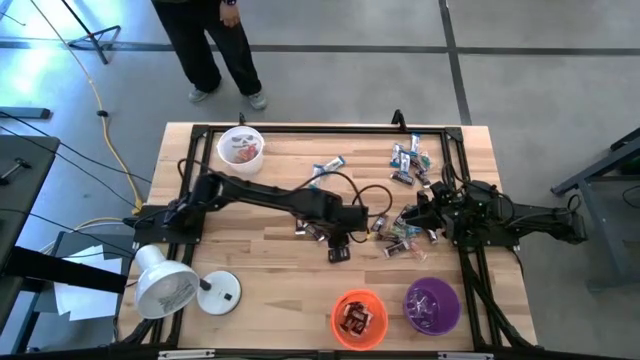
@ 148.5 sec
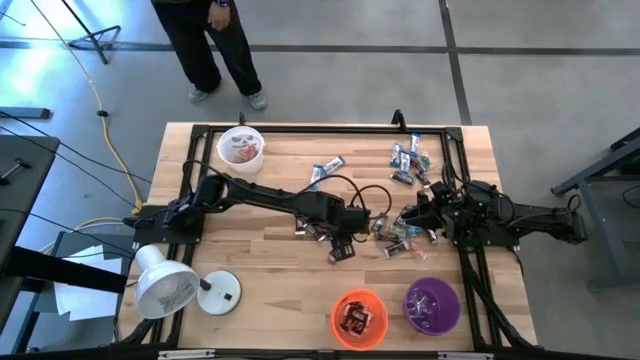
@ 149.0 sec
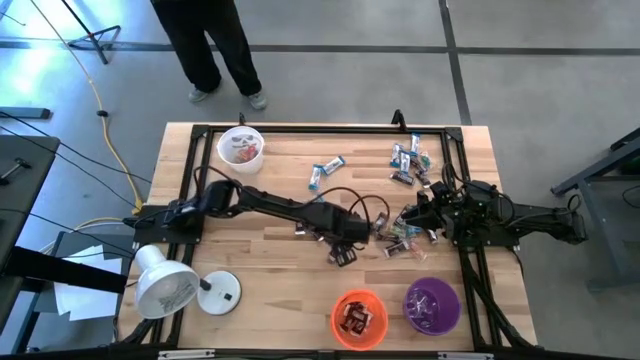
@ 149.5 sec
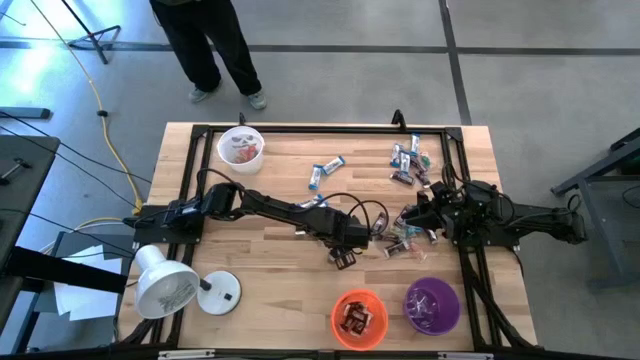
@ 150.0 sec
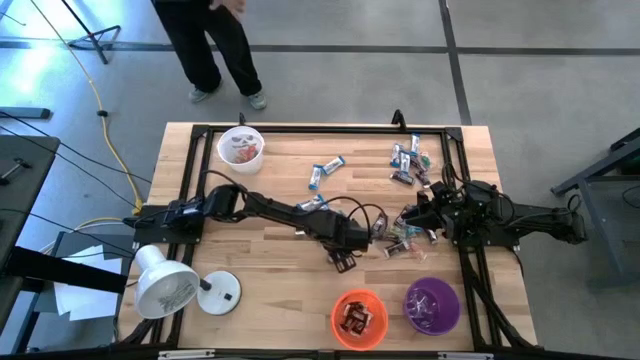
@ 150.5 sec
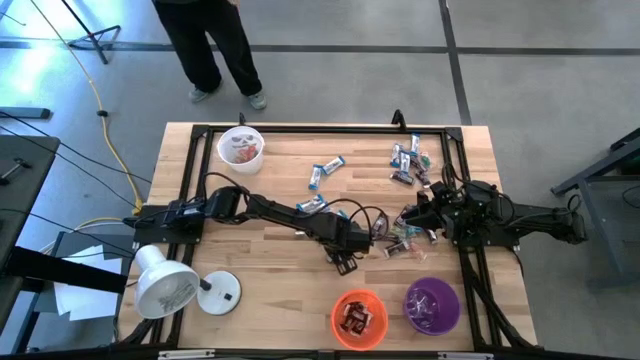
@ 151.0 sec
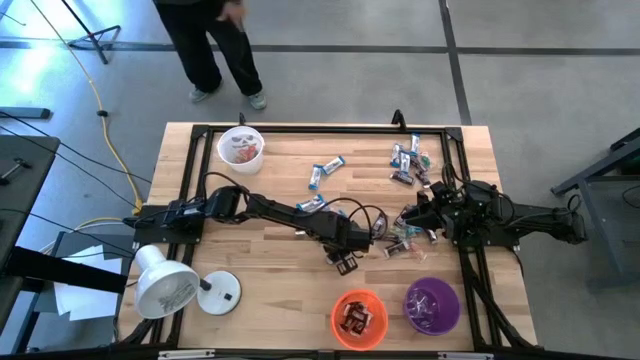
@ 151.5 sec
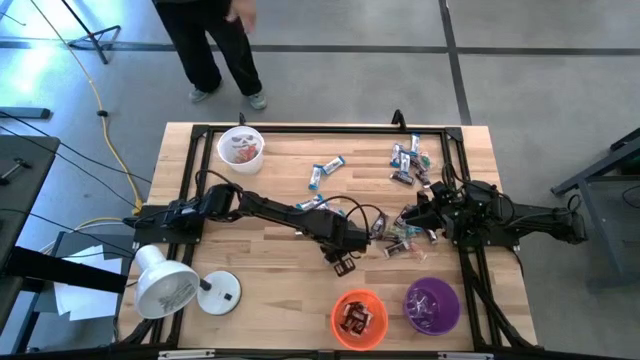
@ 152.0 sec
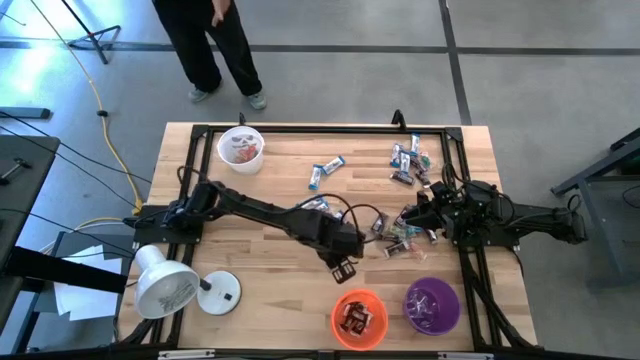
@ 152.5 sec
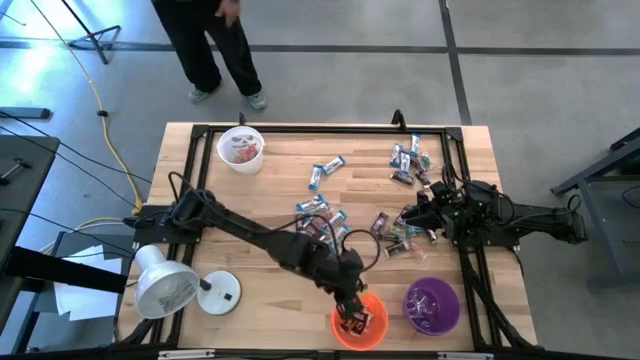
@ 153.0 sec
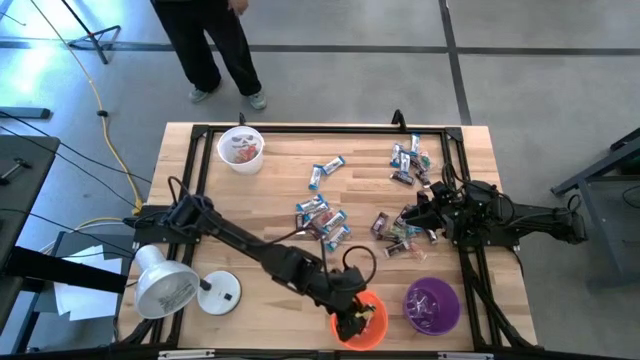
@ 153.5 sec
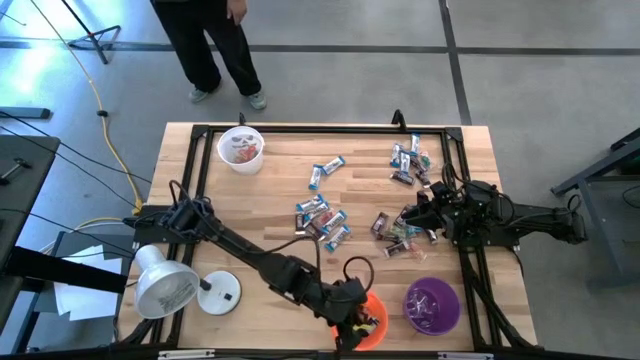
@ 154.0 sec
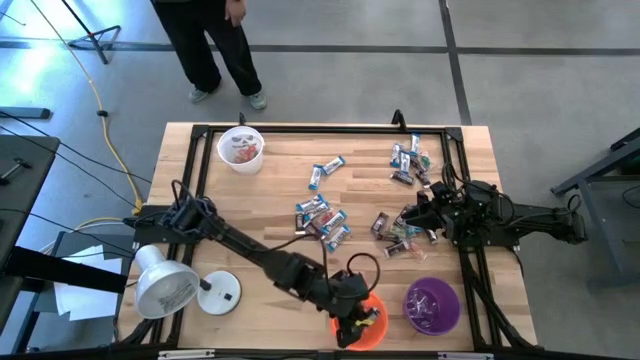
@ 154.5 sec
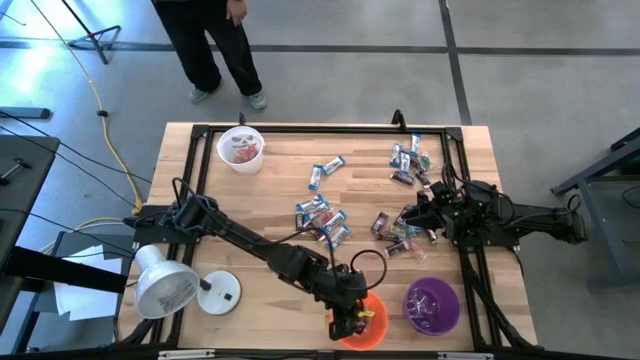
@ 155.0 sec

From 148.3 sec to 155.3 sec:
Task: Organize candy in baskets
Put the brown chocolate into the orange bucket

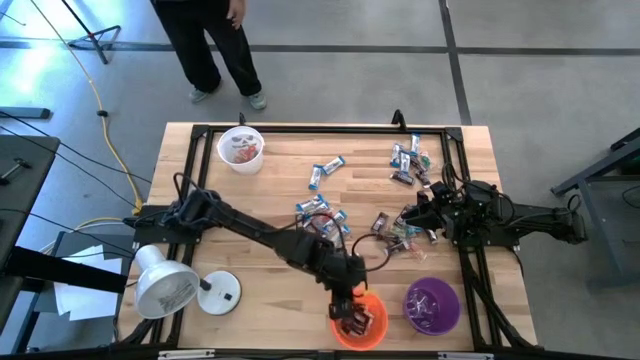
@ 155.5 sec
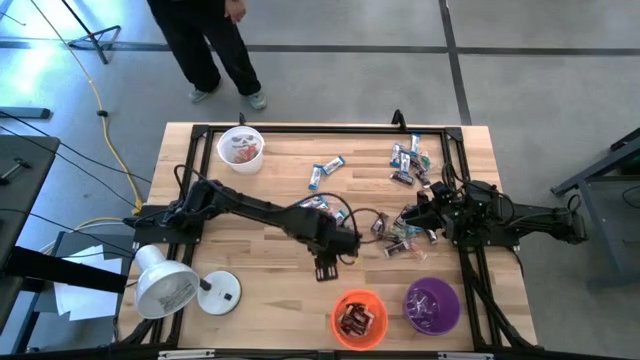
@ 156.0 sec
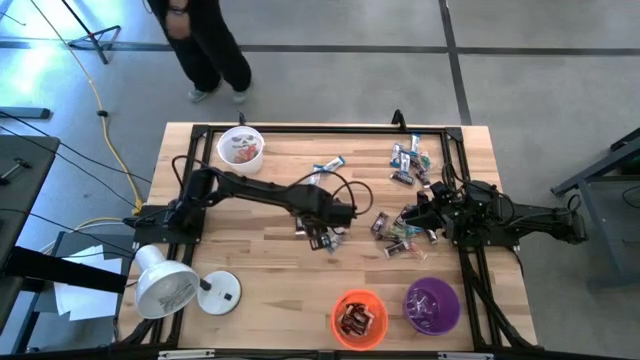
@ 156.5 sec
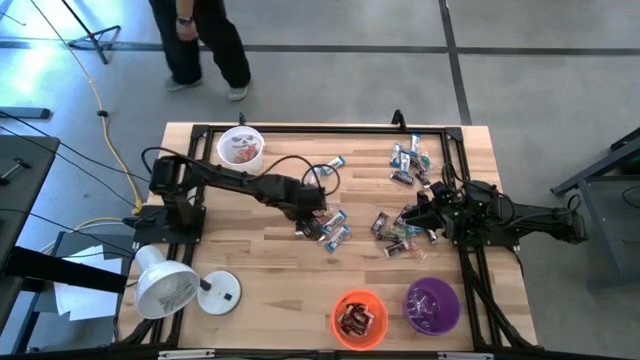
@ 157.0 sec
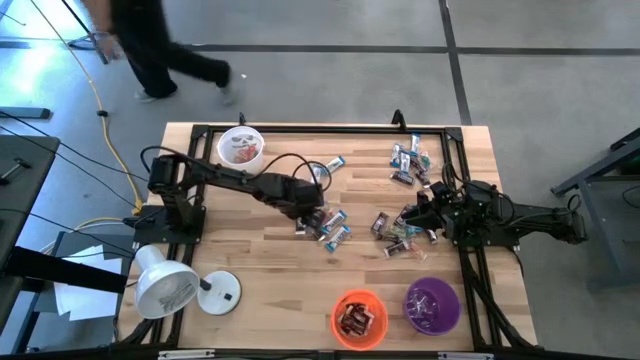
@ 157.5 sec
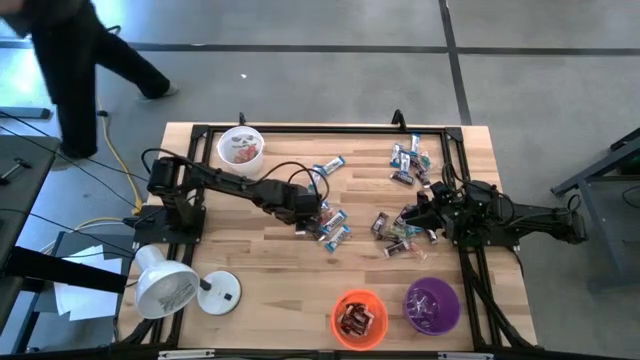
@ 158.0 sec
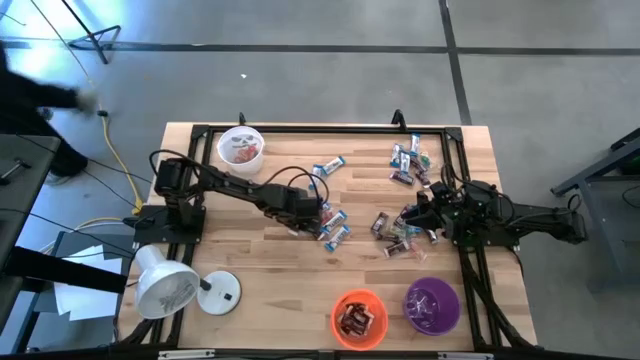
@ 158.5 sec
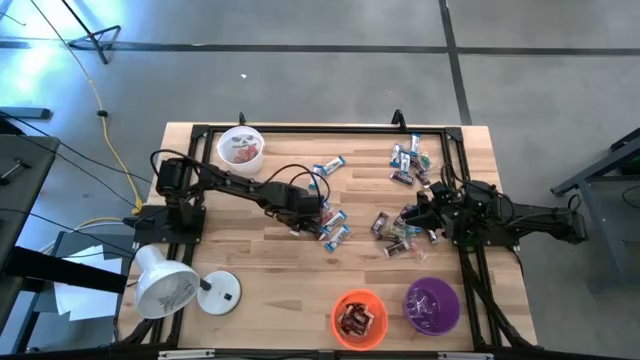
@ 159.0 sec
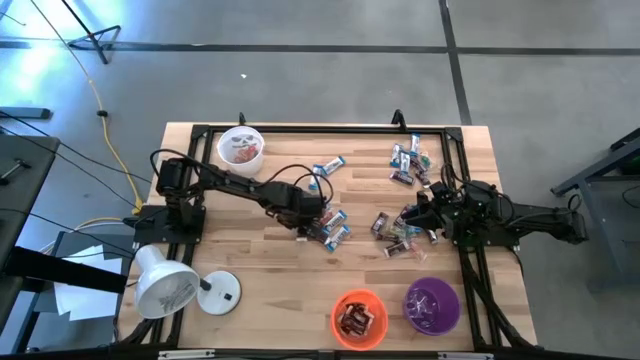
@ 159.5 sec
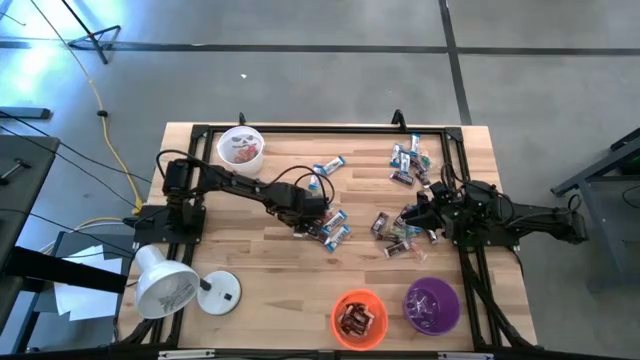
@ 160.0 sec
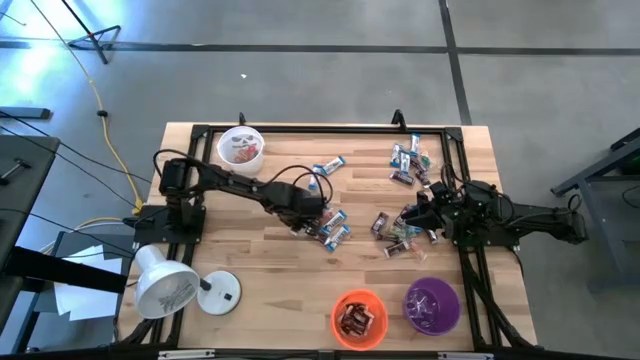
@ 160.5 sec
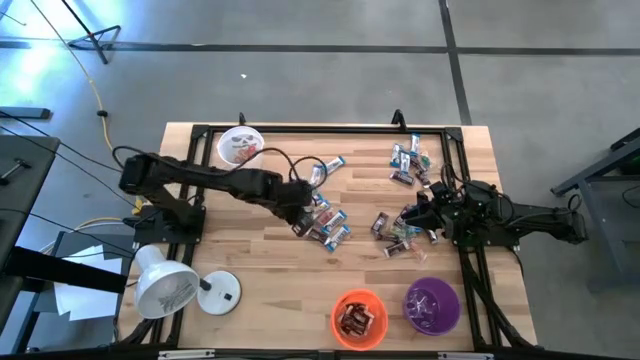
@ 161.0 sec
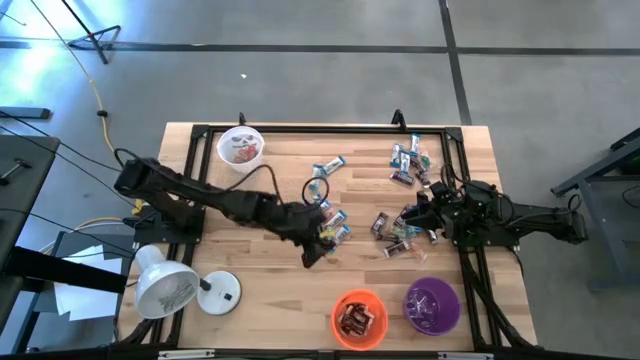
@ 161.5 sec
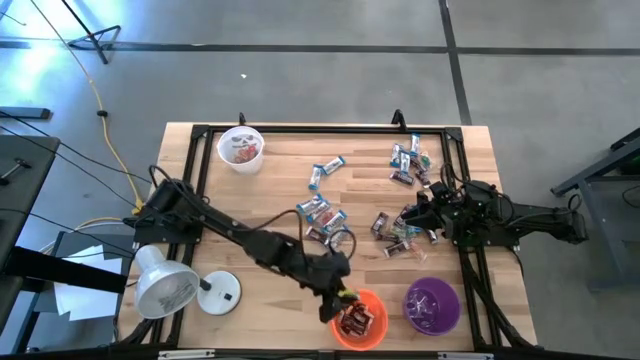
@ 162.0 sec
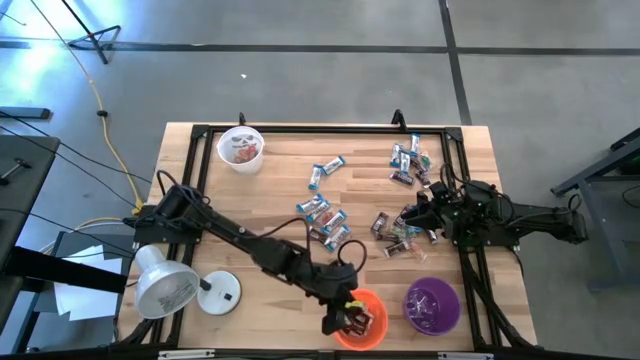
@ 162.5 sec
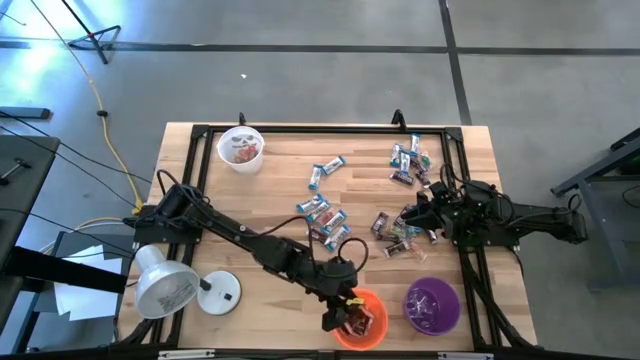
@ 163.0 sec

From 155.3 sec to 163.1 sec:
Put the brown chocolate into the orange bucket

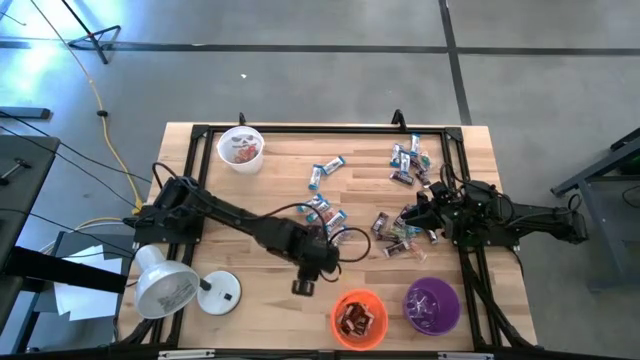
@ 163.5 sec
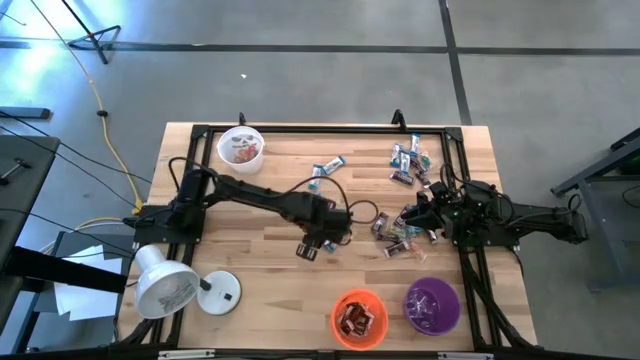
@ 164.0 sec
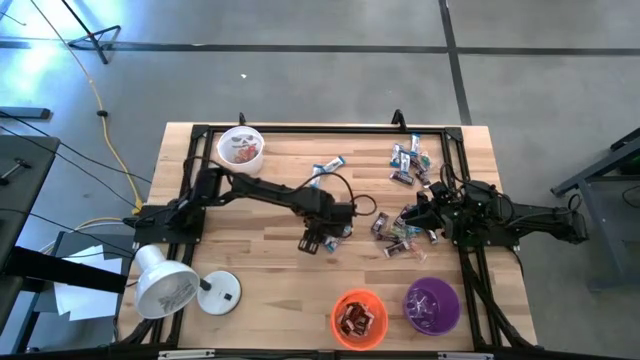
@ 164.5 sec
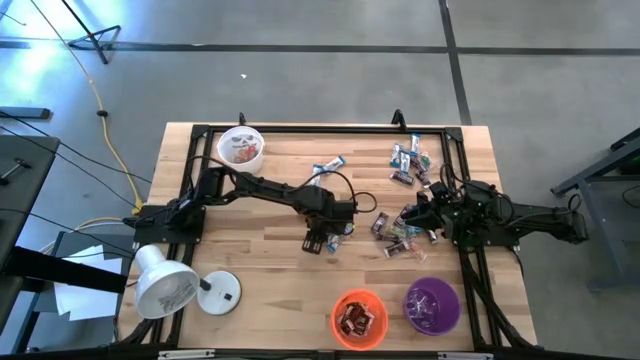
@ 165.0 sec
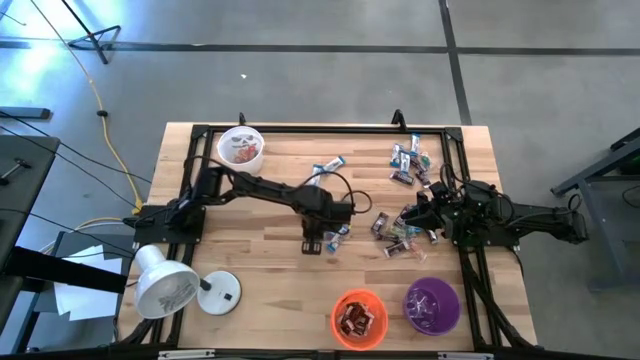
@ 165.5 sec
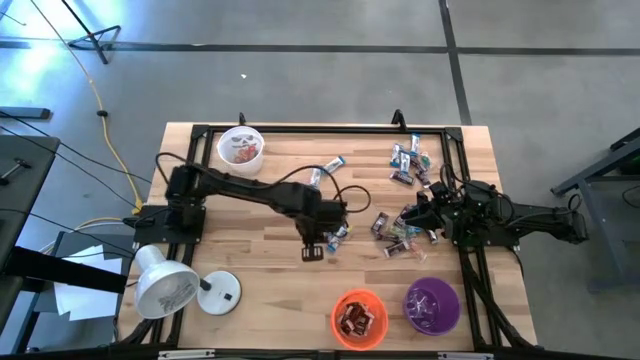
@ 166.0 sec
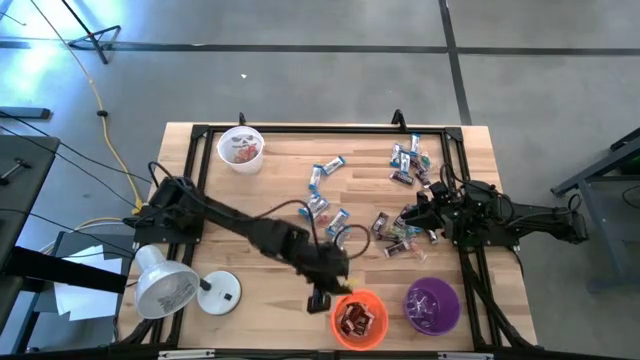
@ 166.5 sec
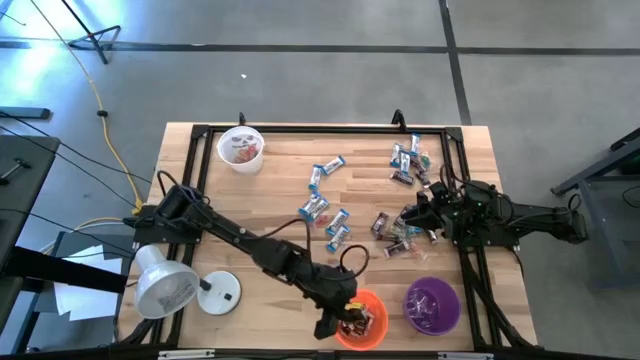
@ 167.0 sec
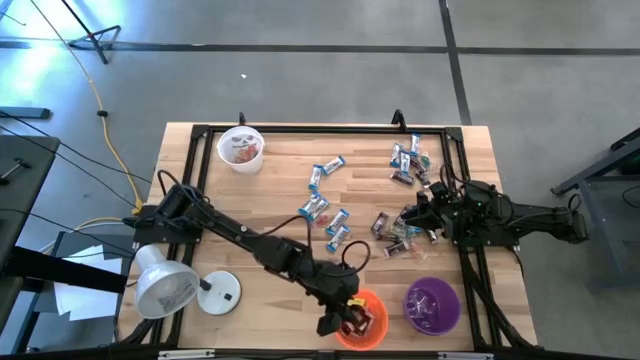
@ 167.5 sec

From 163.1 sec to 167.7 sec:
Put the brown chocolate into the orange bucket

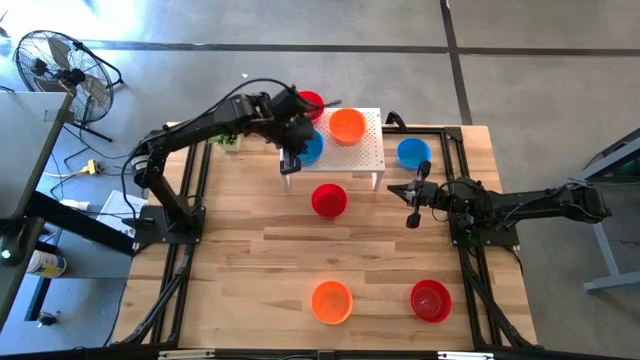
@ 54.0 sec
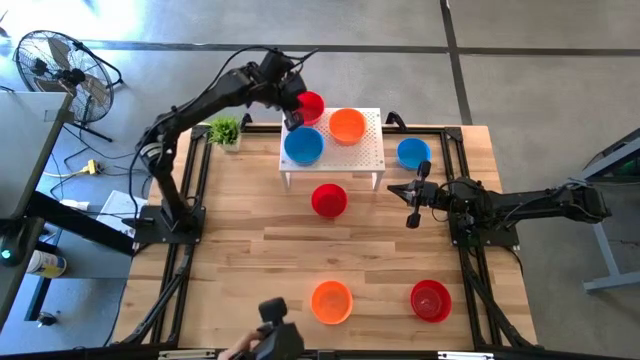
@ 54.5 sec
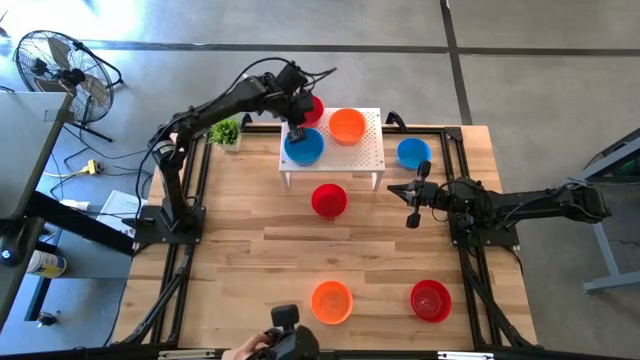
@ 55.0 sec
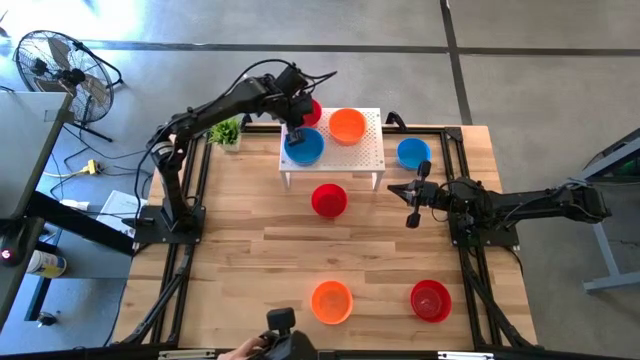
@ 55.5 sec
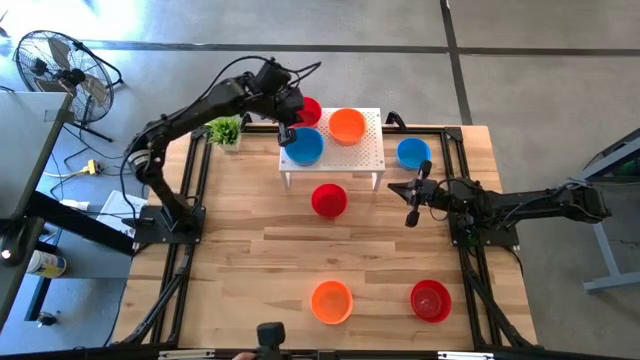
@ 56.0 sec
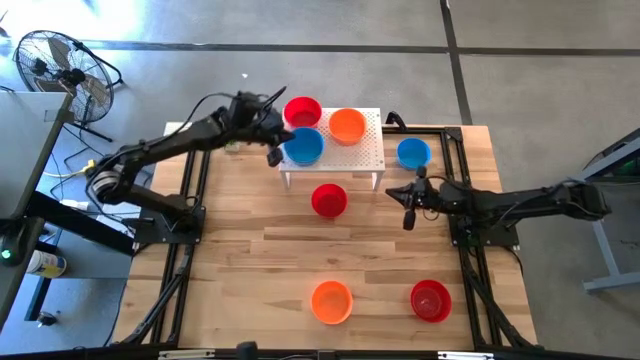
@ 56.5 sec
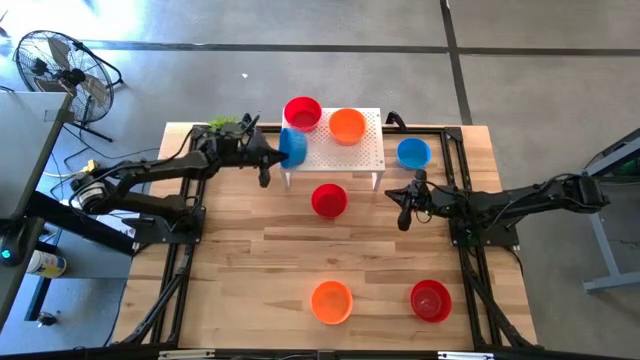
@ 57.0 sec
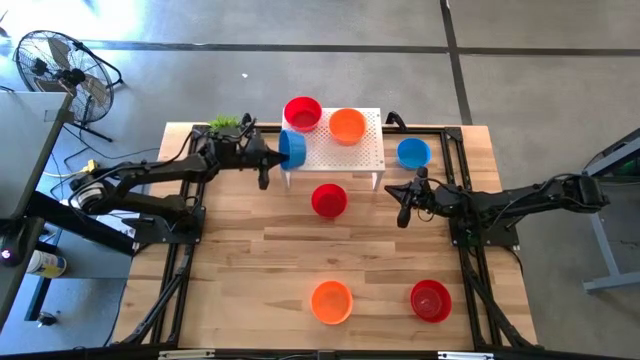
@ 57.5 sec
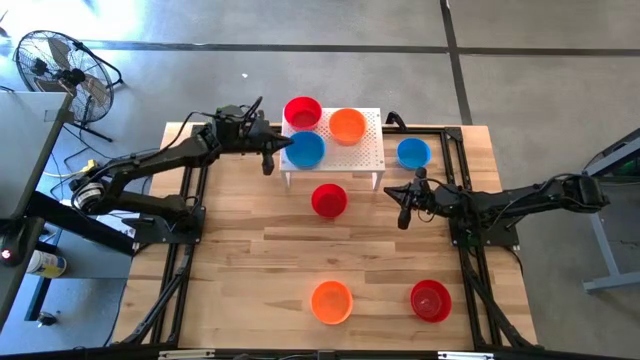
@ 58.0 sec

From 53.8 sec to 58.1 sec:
Task: Pick & Place Mini bowls
Adjust the bowls on the shelf
